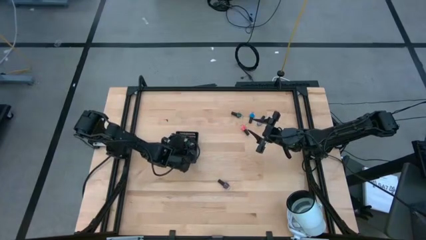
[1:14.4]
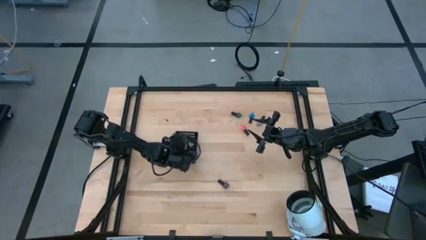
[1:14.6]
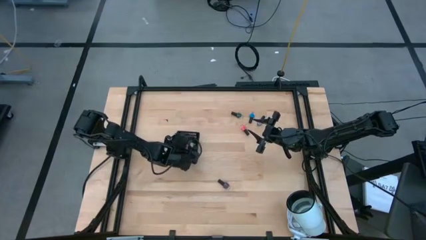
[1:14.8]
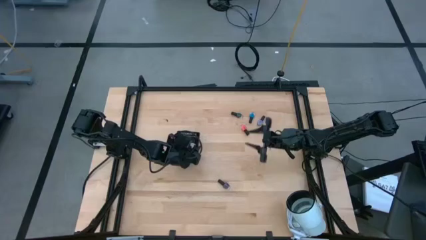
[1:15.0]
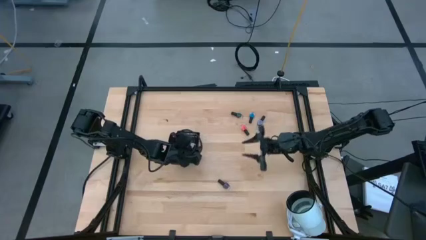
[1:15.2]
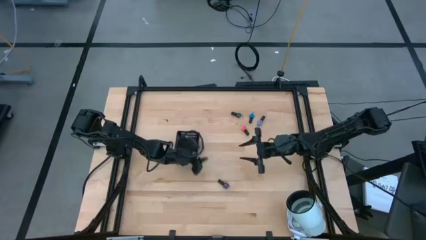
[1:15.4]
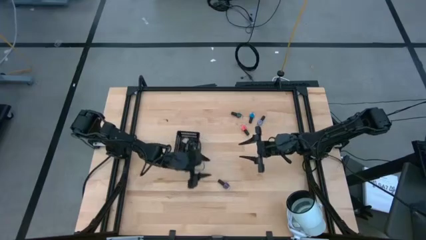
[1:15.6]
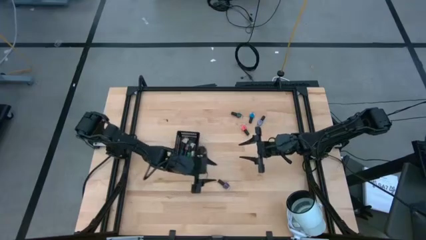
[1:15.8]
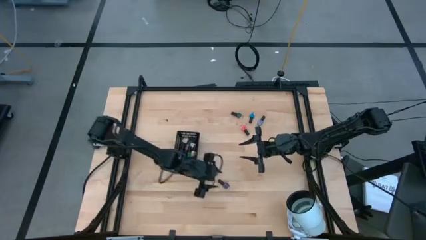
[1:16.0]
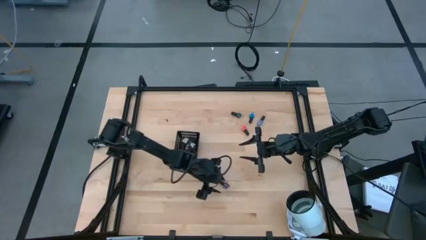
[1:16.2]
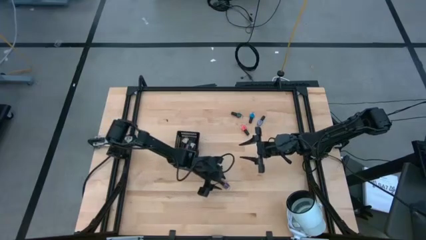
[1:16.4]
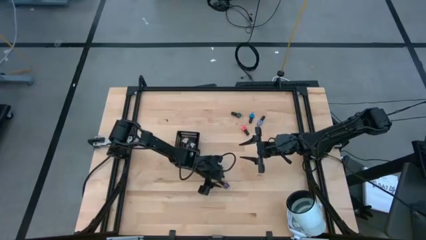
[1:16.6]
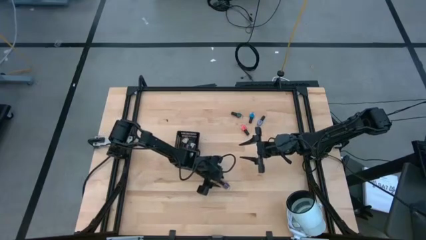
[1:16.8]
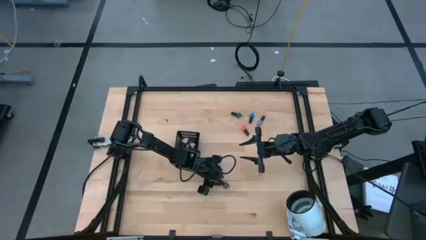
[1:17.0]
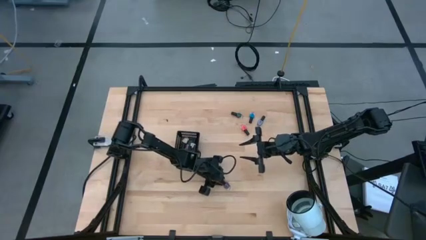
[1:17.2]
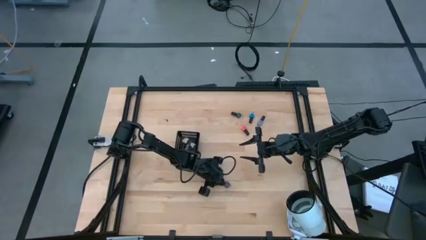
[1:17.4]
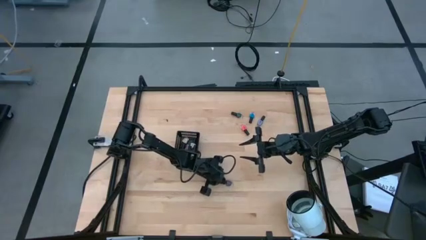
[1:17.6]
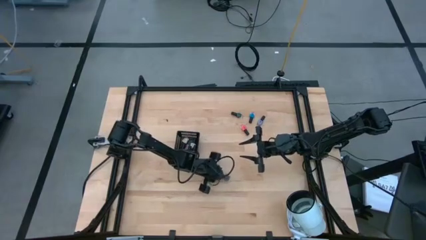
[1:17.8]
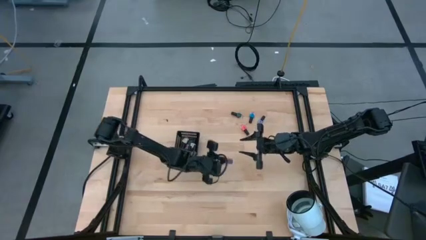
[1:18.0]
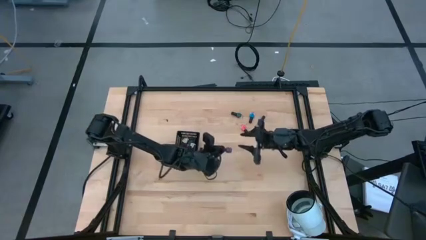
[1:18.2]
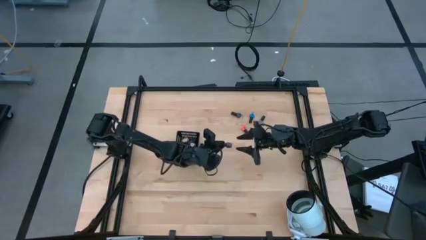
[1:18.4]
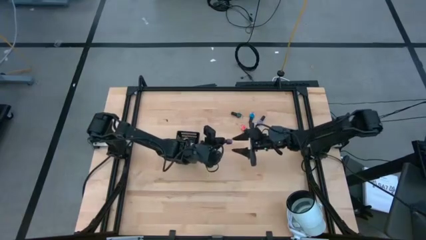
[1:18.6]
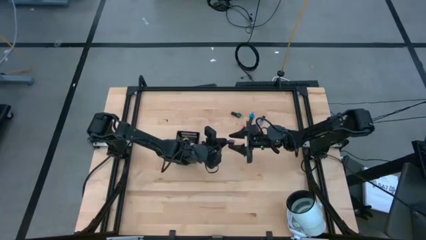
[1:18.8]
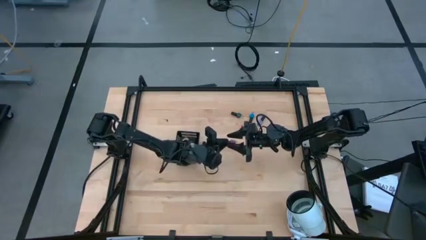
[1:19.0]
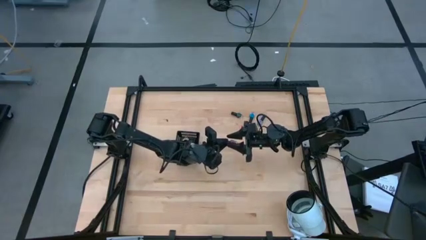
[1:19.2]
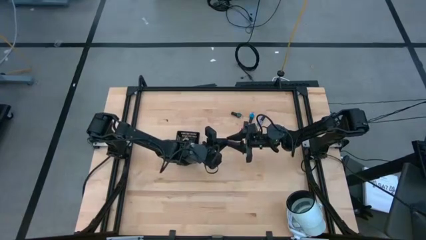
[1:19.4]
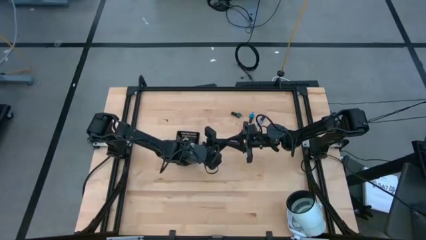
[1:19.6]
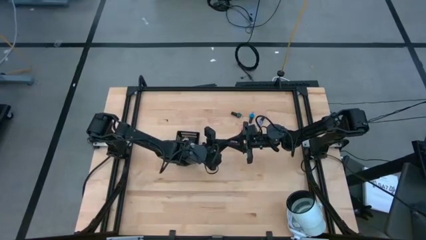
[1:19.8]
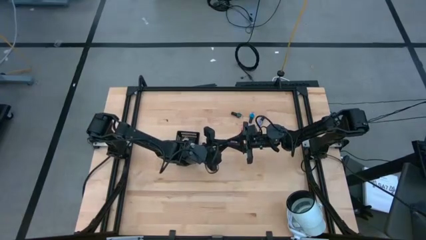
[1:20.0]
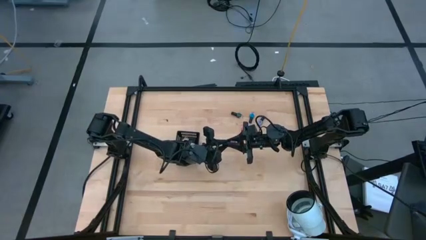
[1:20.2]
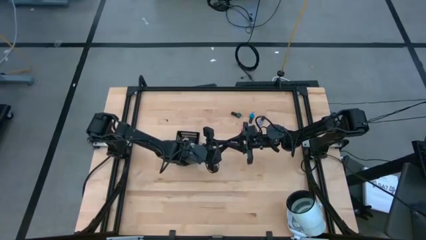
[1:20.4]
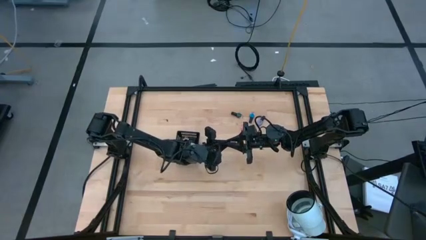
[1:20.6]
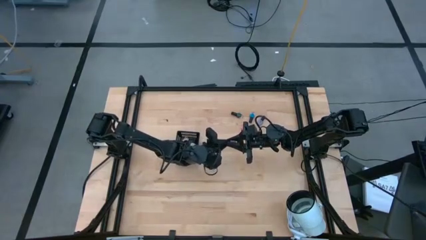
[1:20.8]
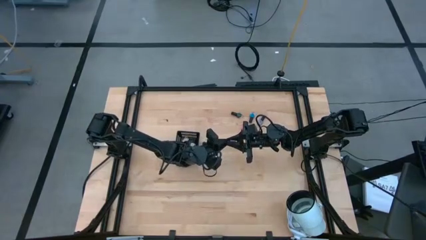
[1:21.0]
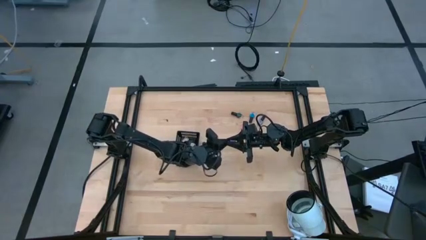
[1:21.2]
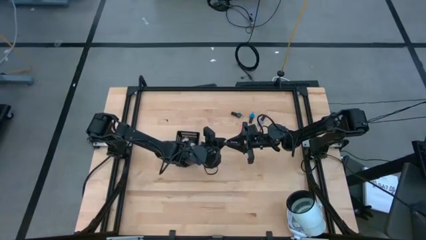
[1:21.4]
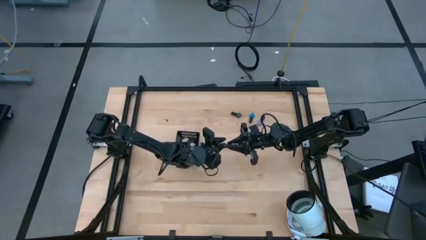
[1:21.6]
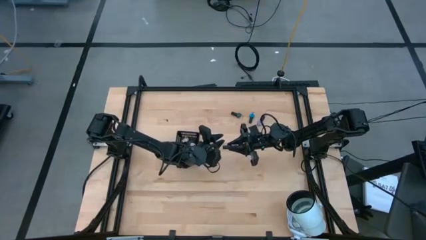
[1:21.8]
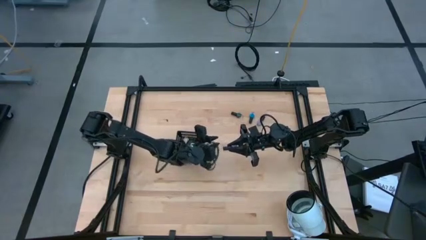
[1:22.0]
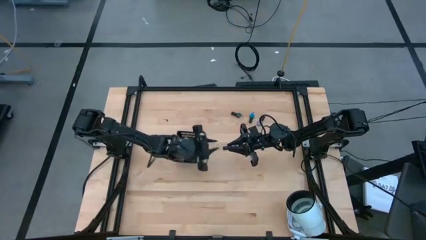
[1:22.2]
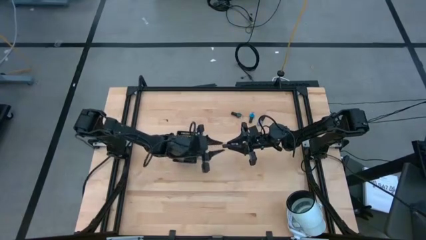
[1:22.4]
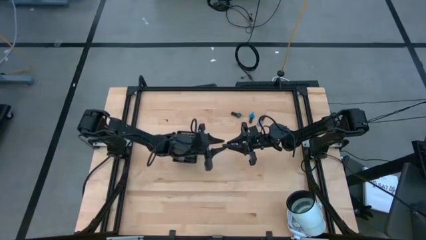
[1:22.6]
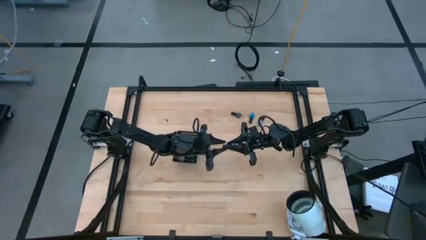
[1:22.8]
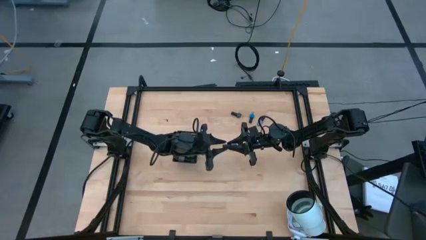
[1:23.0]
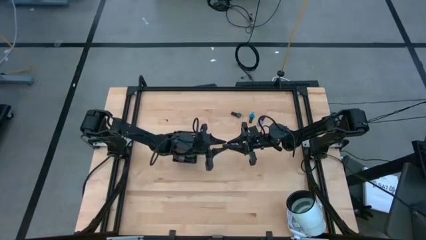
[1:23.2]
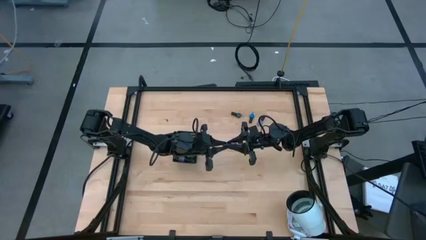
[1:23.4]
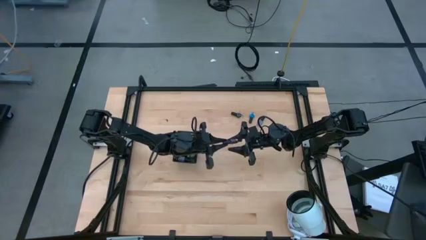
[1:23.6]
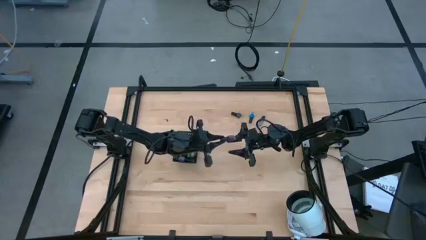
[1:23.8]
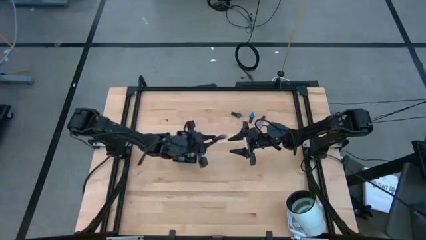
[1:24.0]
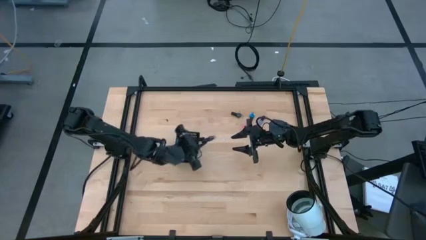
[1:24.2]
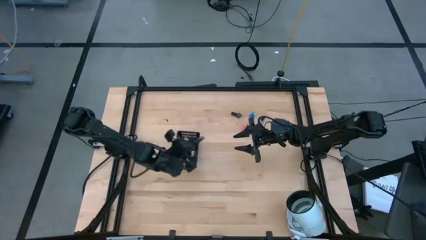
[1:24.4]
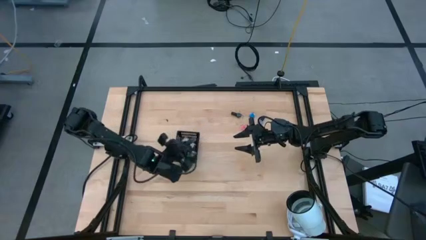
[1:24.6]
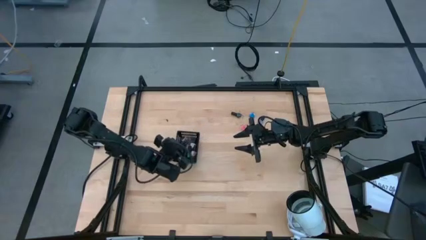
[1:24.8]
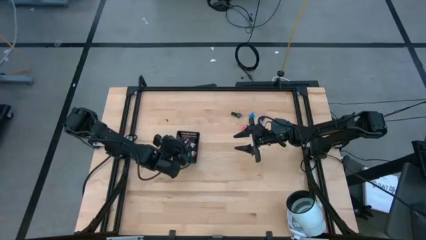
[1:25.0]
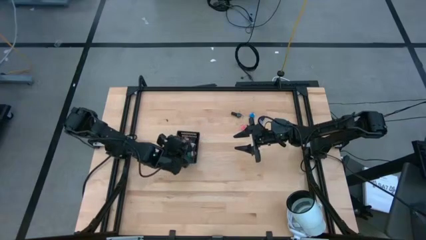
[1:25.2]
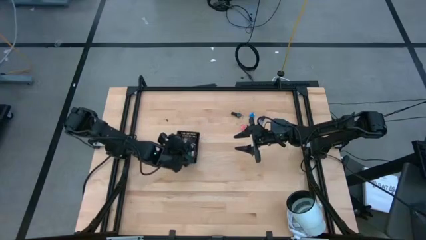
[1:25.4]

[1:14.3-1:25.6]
Task: Pick & Place Nail Polish
Put the violet nail polish into the basket

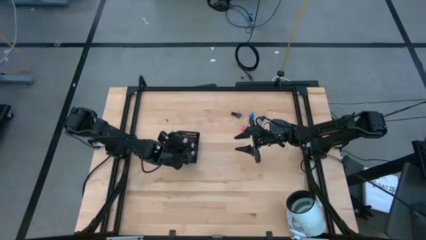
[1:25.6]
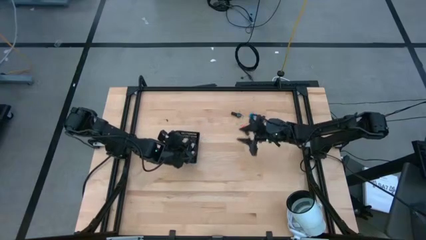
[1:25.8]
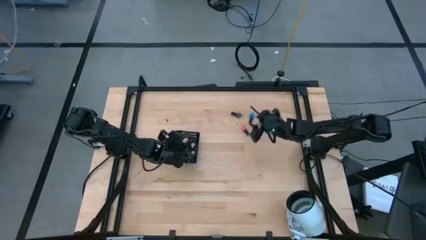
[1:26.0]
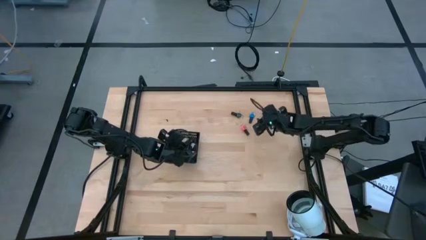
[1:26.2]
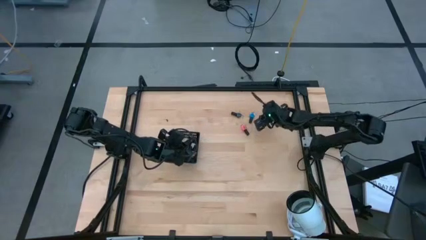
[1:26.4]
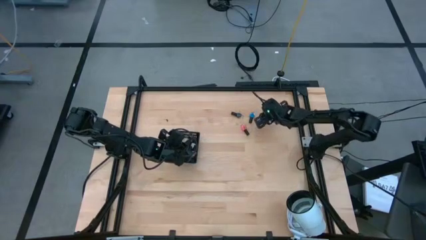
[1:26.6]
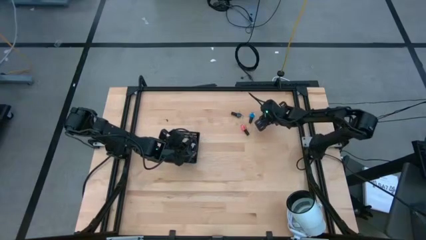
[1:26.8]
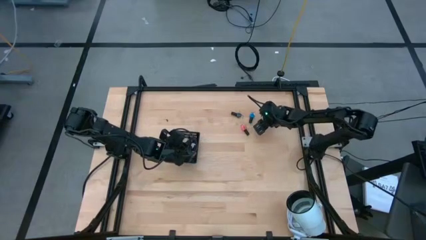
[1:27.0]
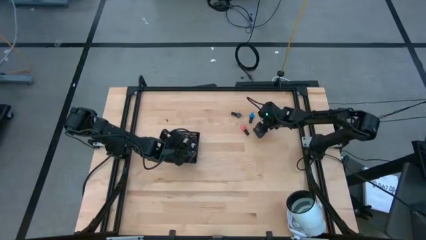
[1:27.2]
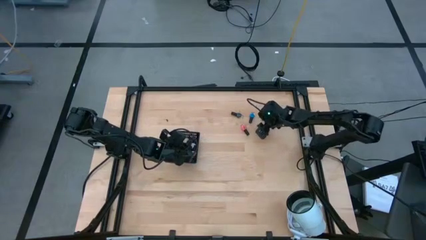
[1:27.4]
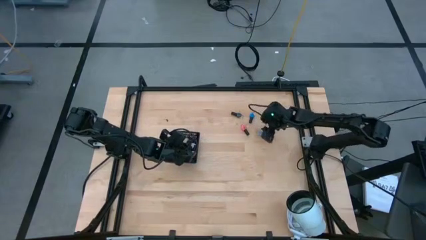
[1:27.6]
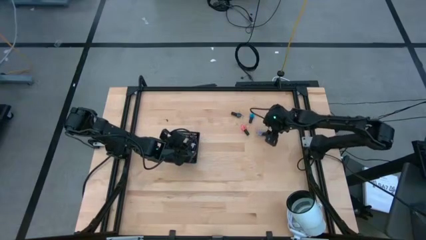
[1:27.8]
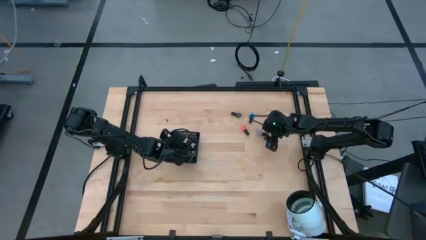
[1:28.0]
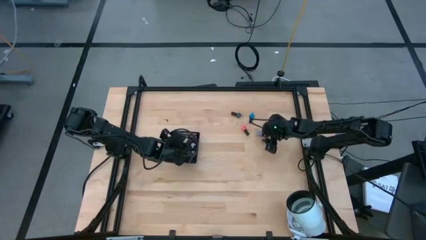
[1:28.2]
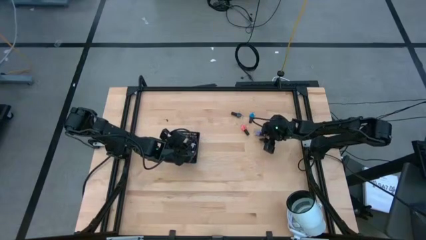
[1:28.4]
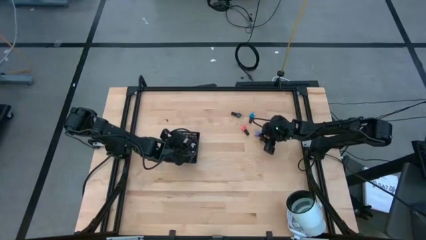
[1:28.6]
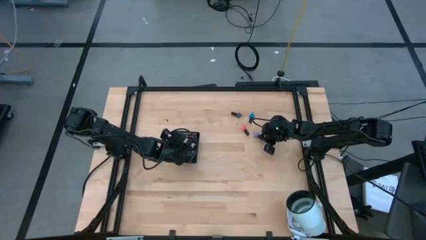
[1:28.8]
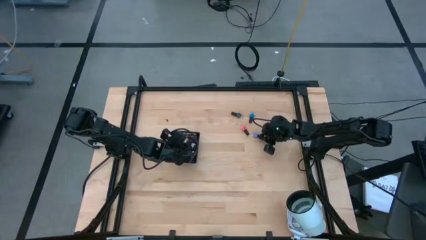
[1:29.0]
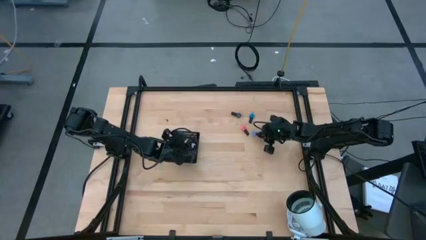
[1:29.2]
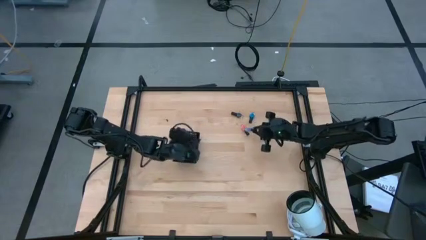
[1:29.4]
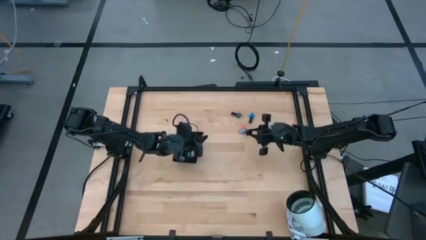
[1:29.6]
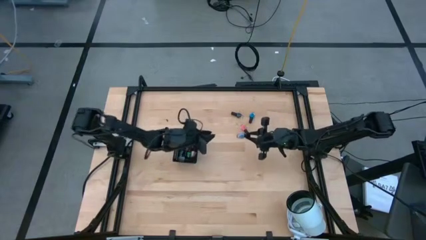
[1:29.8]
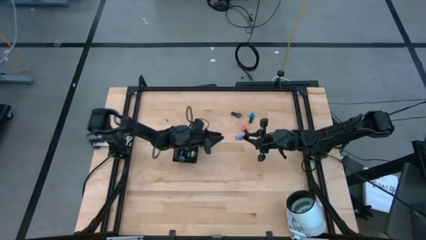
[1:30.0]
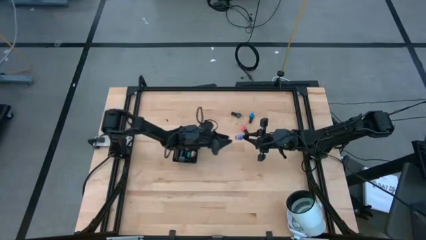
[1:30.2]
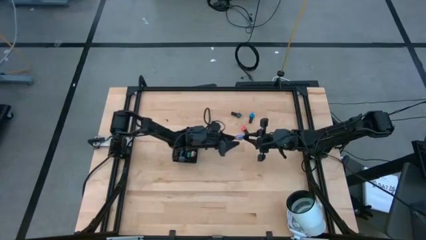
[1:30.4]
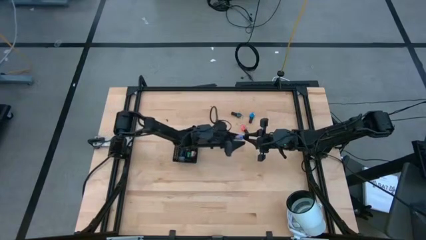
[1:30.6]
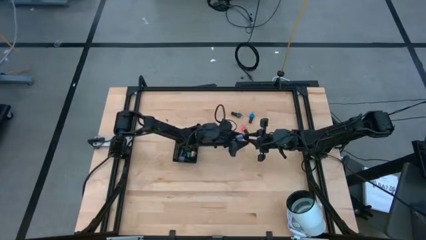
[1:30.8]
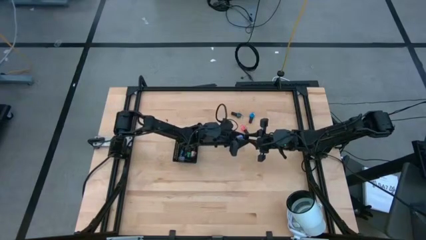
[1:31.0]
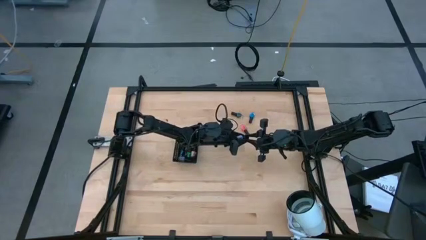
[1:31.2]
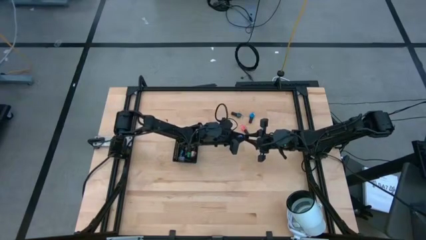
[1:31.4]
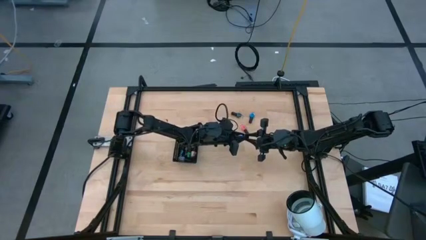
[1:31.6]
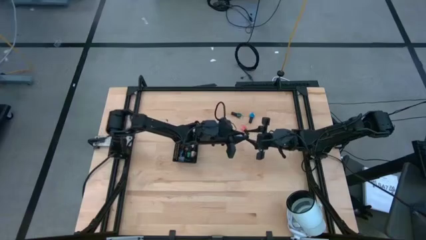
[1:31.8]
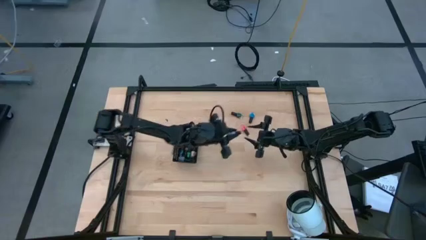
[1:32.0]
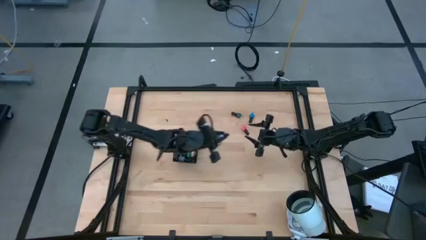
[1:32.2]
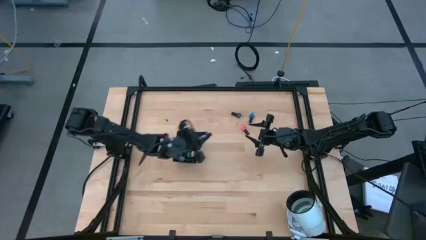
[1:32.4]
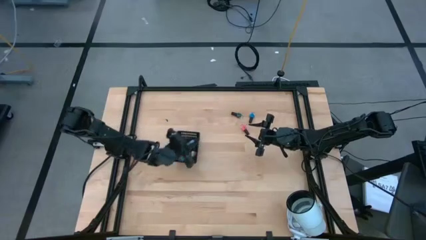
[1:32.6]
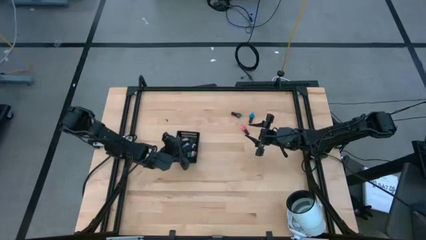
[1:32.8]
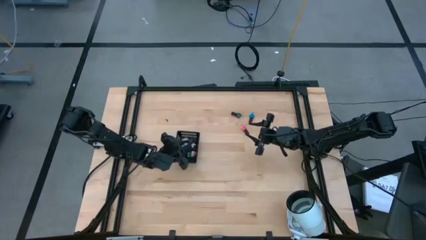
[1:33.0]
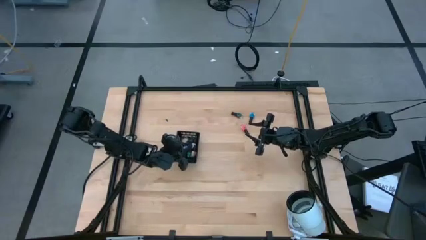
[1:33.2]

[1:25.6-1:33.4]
Put the light blue nail polish into the basket
